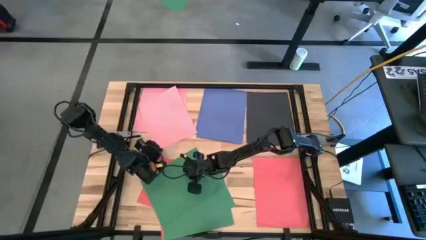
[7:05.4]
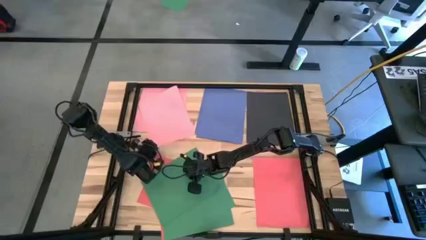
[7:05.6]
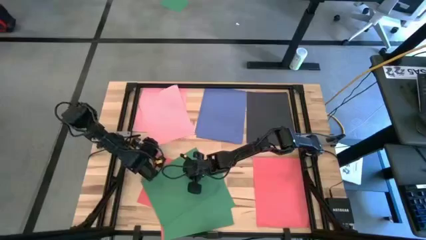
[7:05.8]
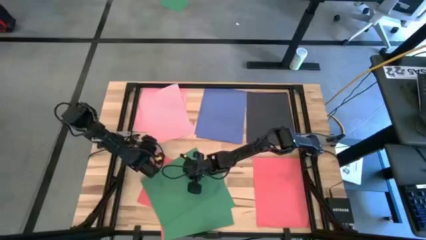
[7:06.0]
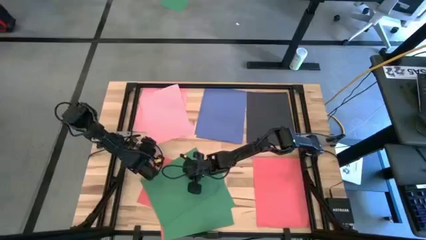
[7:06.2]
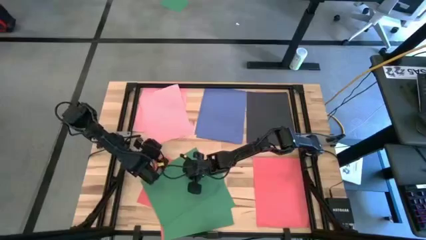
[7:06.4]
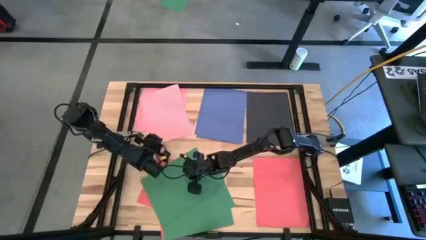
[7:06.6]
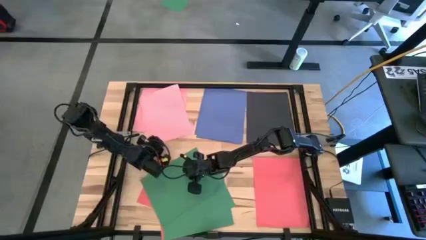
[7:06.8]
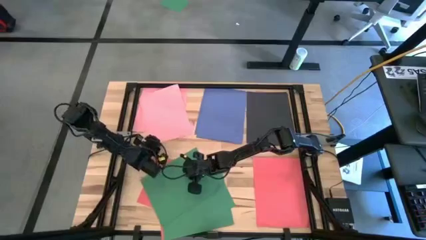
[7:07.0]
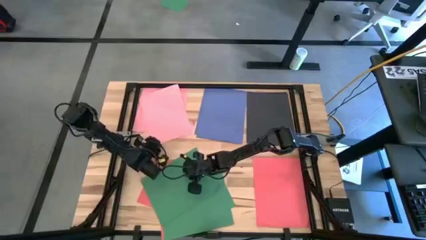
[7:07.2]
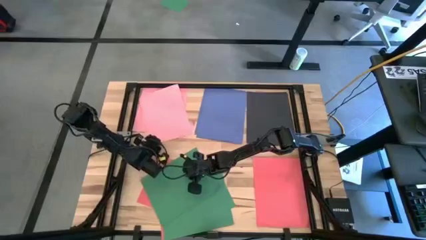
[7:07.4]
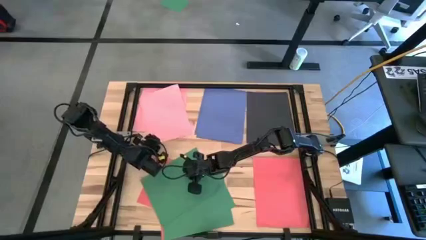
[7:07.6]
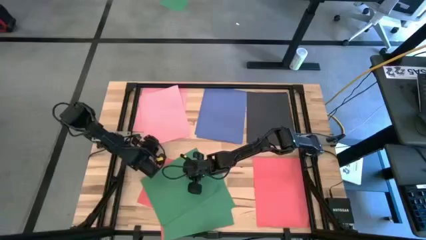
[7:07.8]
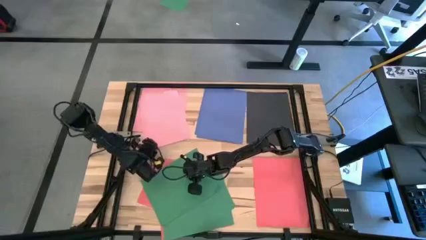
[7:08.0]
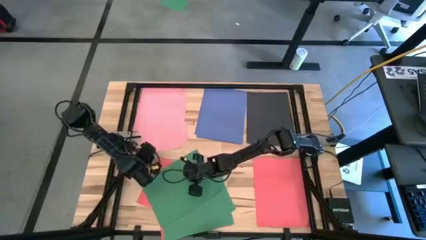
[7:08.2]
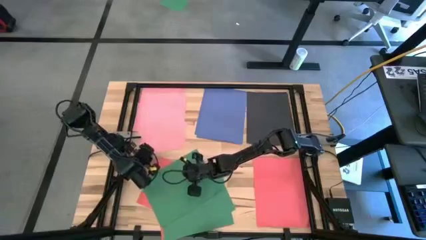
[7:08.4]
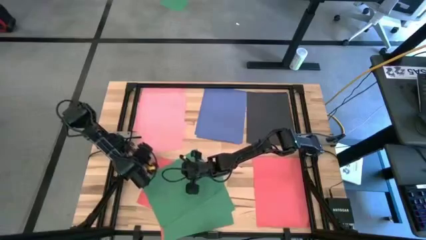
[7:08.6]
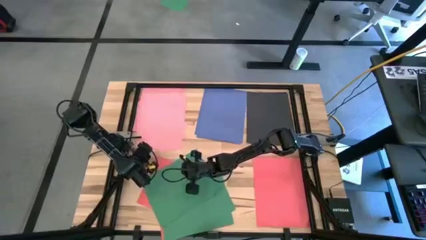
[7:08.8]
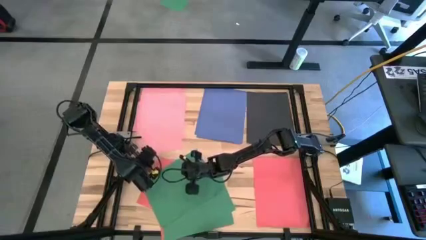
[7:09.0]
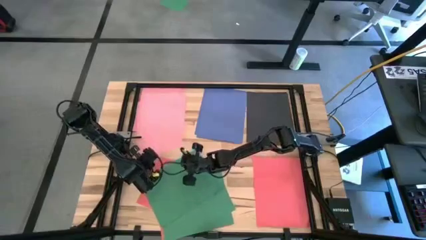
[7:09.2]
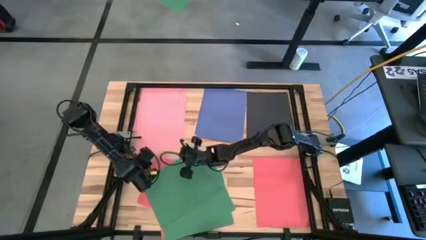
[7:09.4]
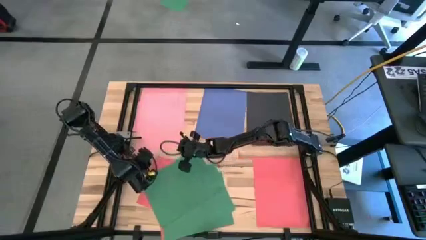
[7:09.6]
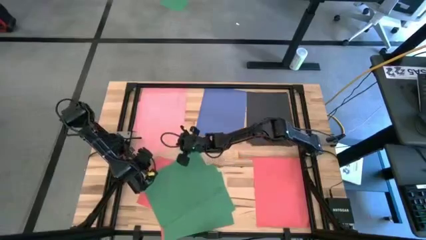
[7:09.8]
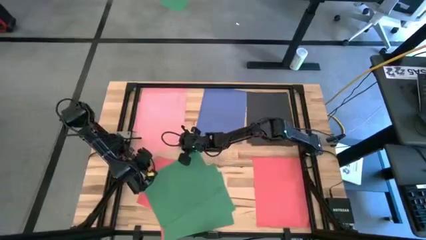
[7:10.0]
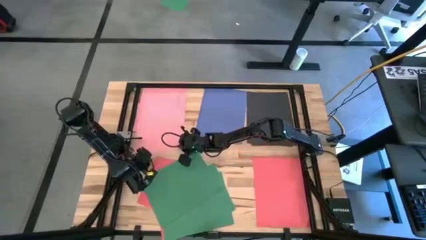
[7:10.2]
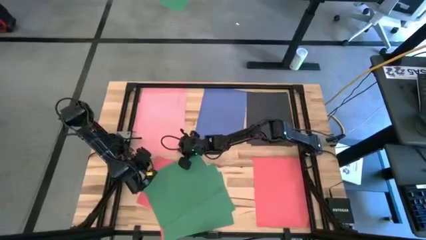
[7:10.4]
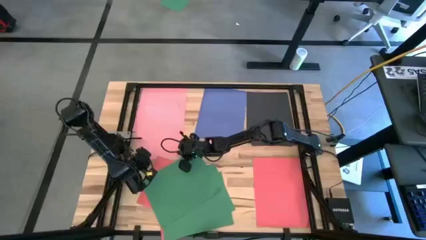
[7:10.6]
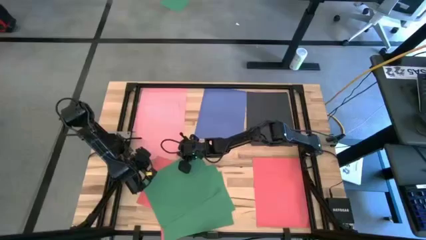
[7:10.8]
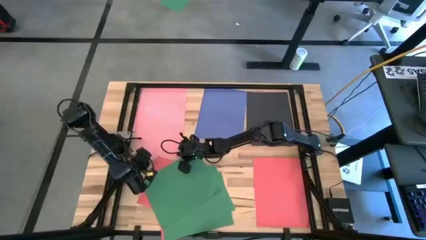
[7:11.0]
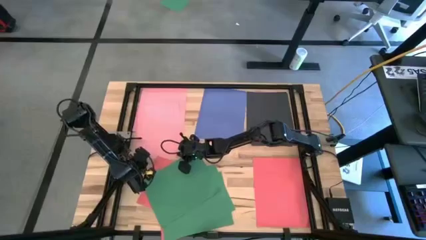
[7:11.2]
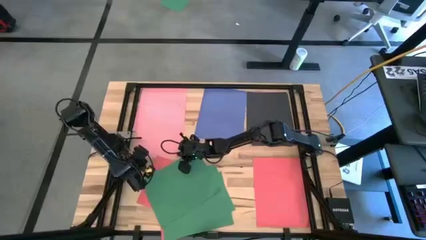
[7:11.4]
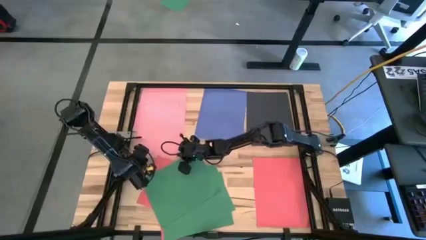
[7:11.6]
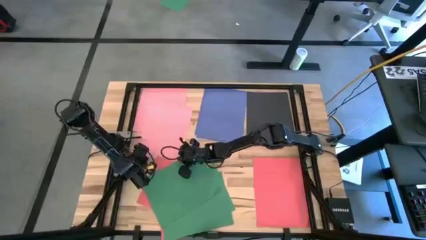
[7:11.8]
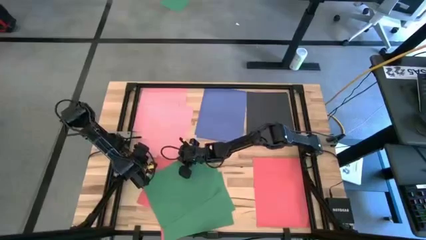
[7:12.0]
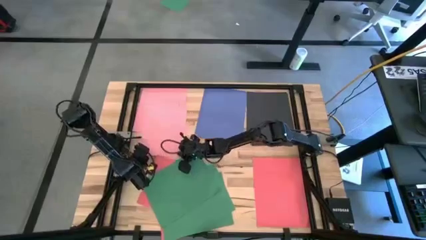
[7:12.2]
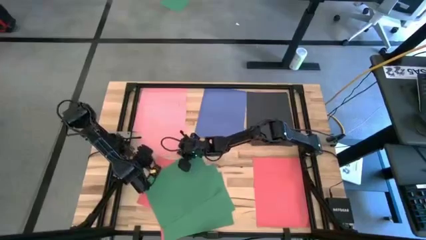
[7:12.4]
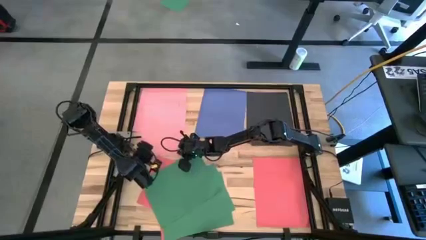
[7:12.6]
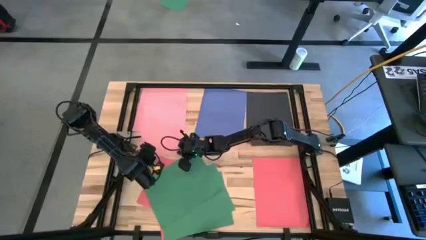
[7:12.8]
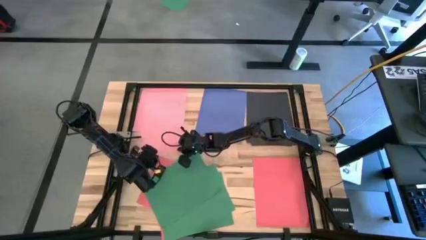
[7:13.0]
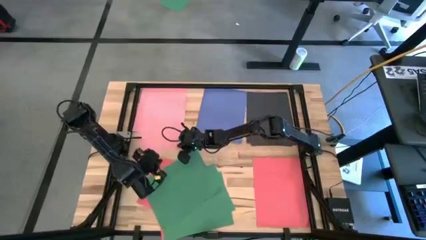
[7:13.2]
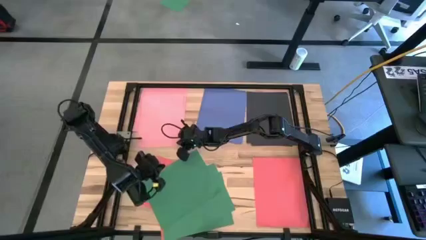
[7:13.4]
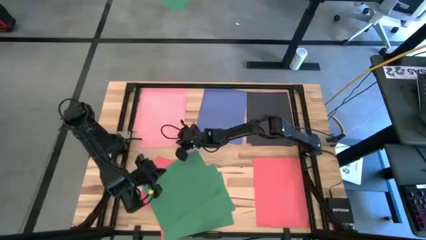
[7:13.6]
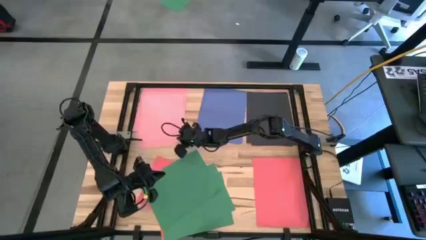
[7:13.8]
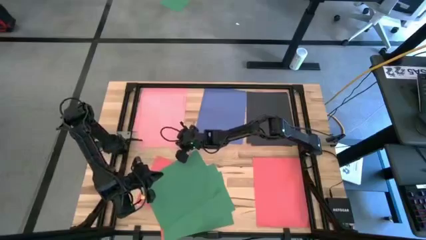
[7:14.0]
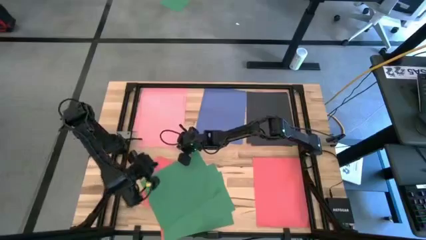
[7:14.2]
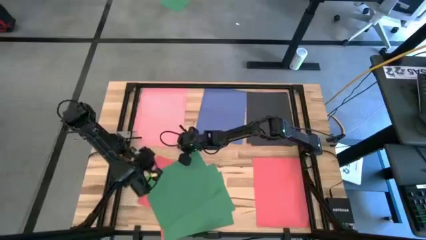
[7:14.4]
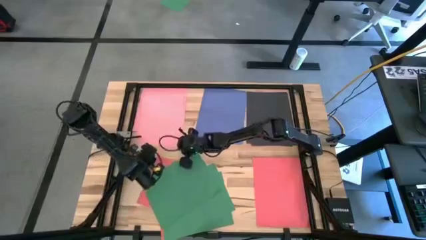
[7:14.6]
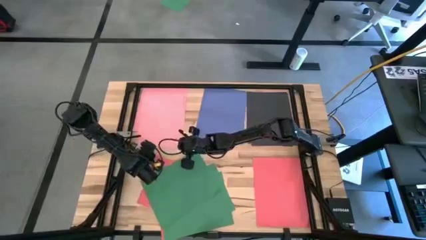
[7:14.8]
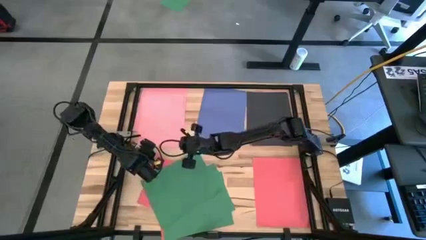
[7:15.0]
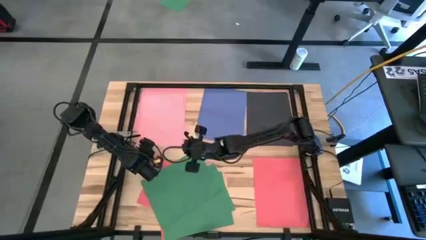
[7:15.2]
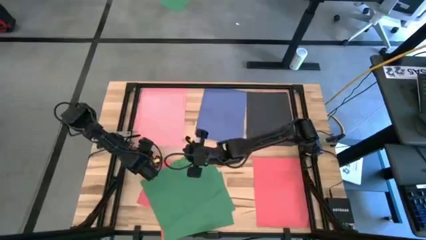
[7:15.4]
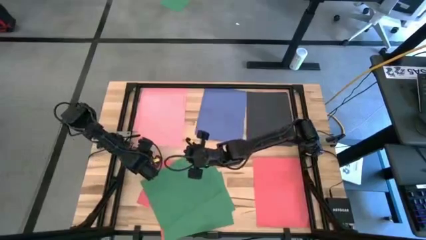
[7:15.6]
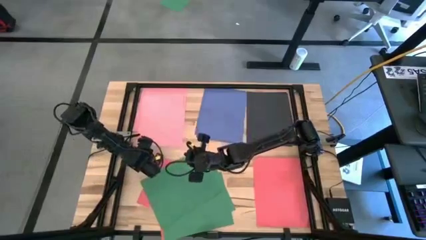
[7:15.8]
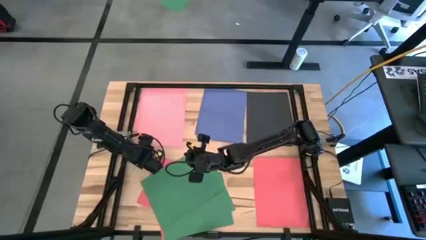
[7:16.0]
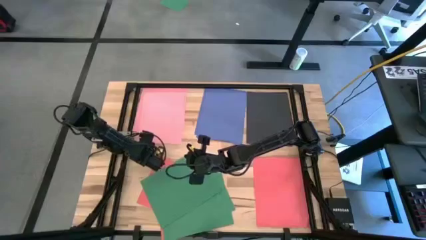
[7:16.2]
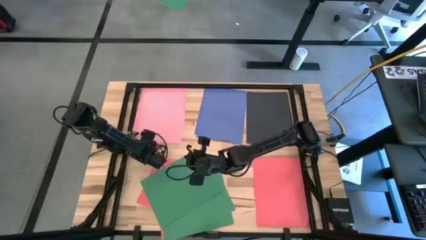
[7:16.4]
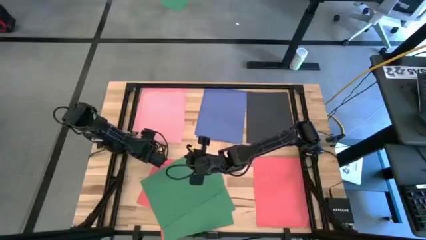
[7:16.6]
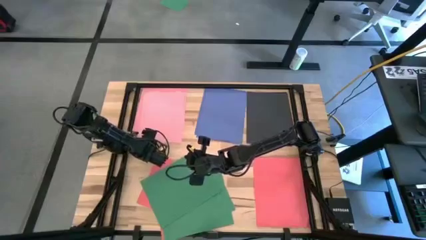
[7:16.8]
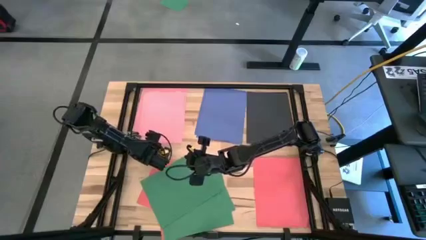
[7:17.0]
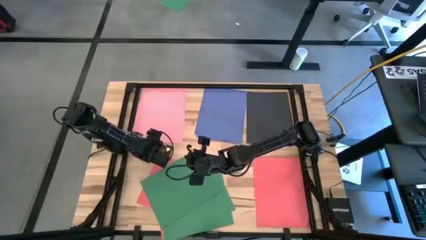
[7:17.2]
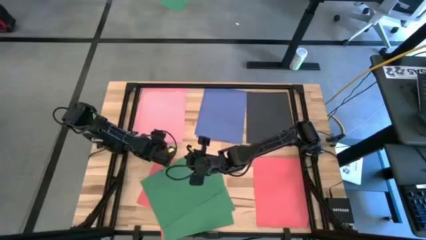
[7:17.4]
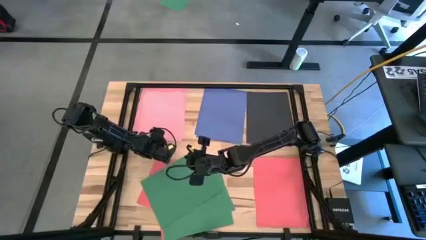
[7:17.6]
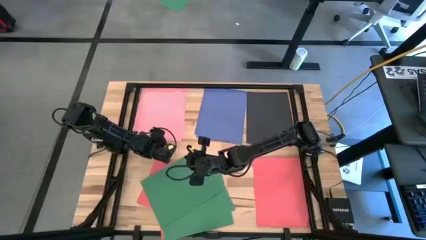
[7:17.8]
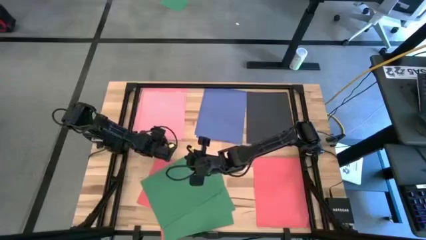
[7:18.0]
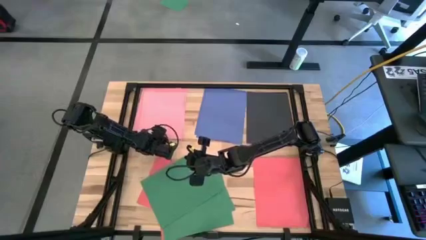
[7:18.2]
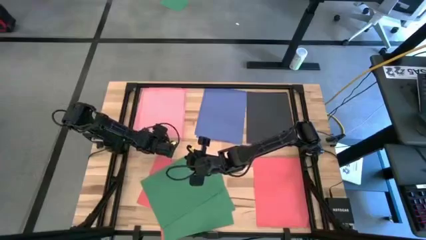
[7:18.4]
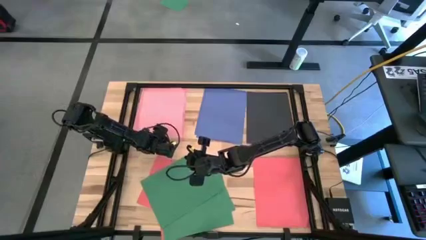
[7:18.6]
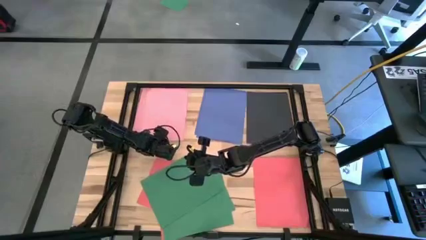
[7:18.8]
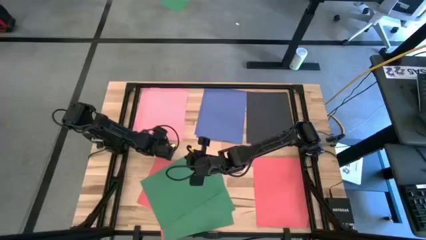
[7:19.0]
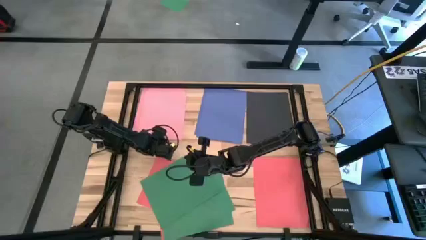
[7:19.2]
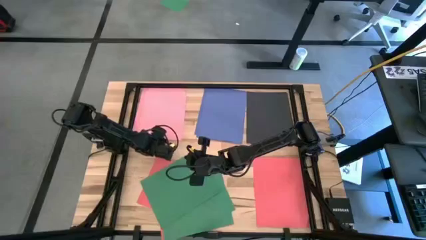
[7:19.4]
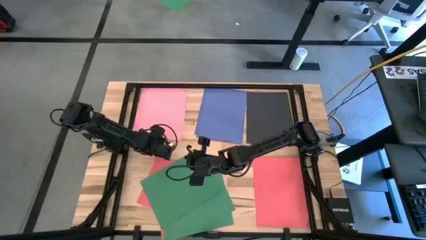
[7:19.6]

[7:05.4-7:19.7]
Task: Organize paper
Stack the pink paper on top of the other pink papers on the table
